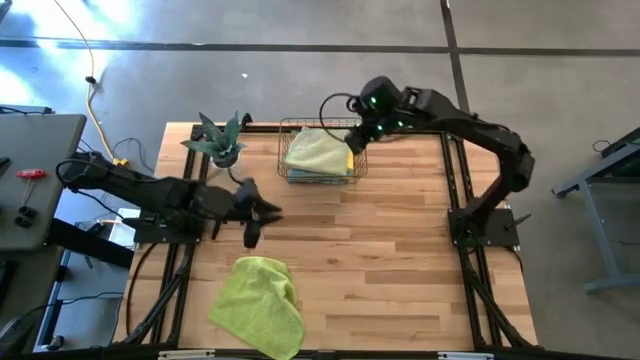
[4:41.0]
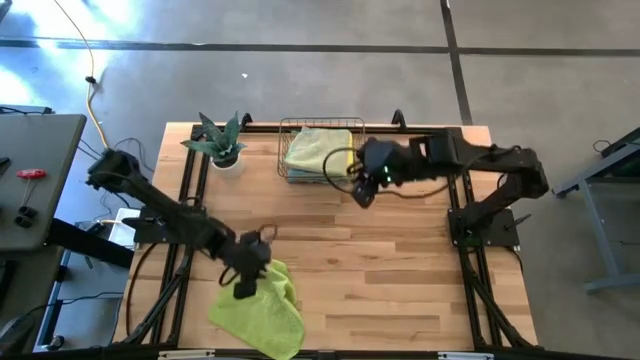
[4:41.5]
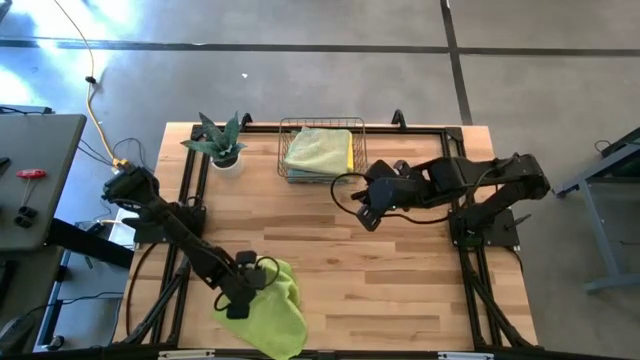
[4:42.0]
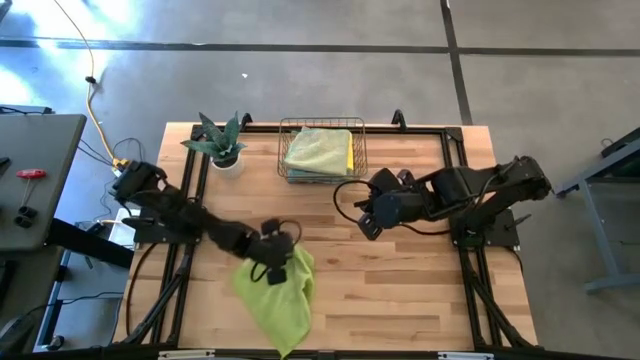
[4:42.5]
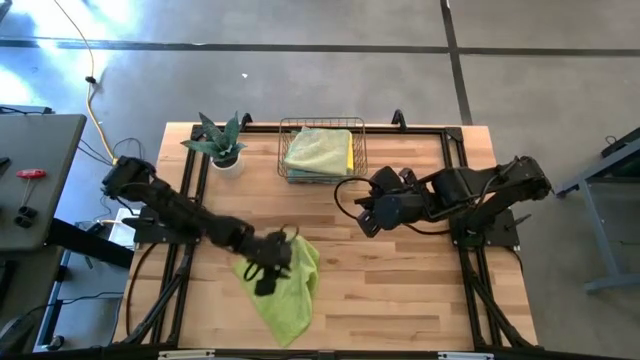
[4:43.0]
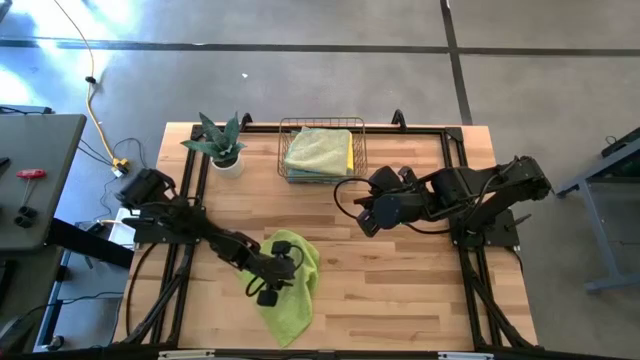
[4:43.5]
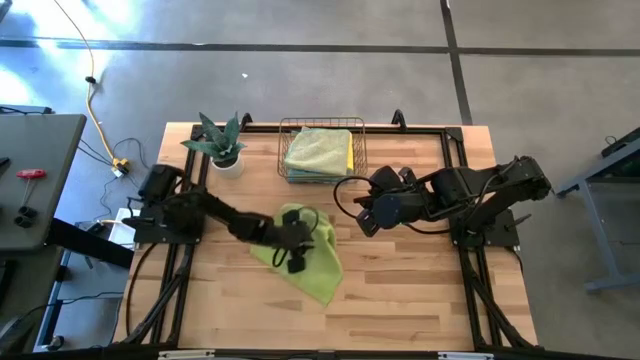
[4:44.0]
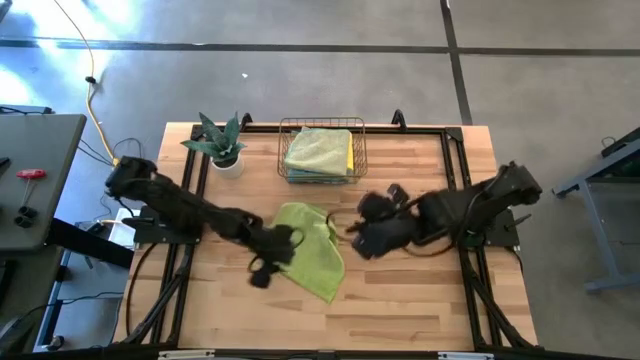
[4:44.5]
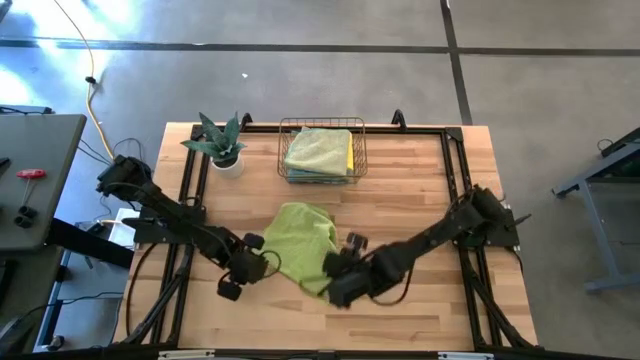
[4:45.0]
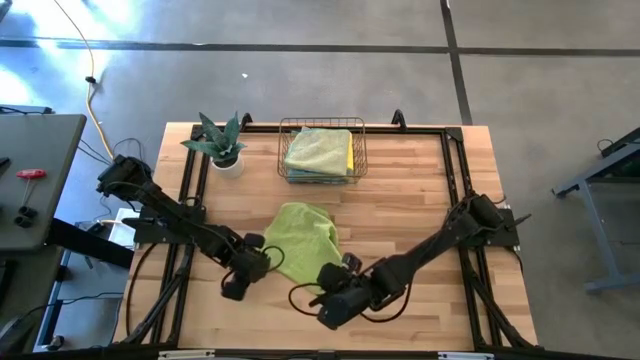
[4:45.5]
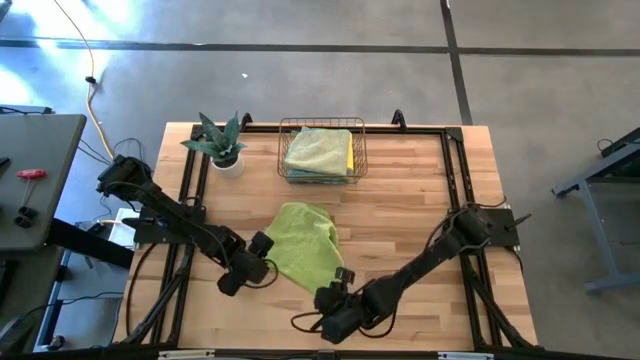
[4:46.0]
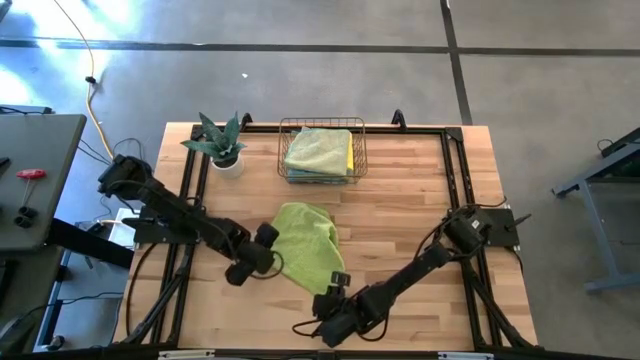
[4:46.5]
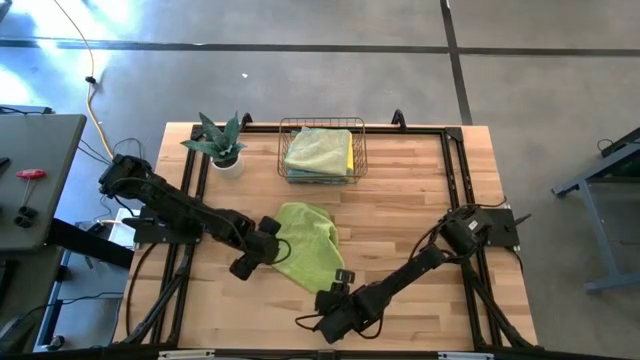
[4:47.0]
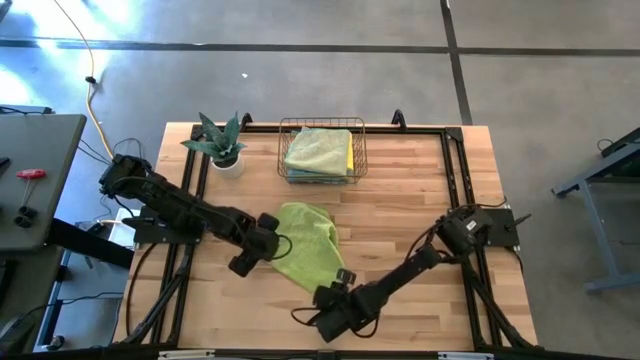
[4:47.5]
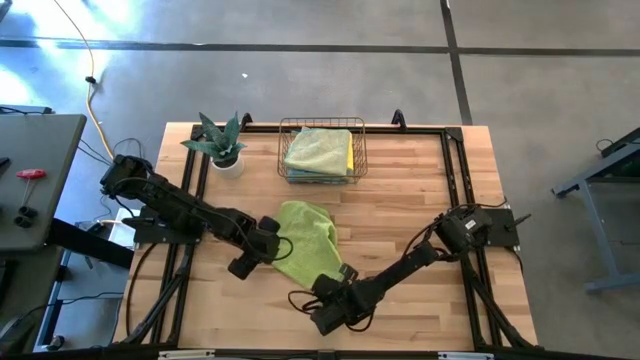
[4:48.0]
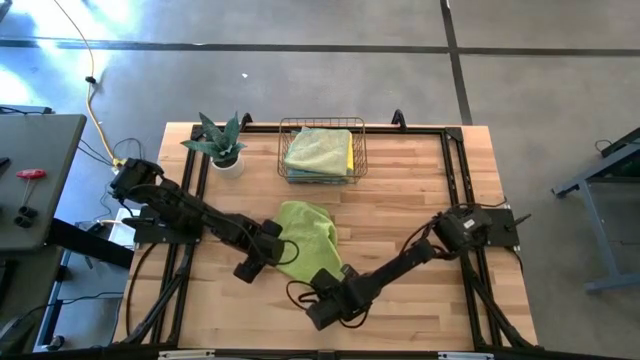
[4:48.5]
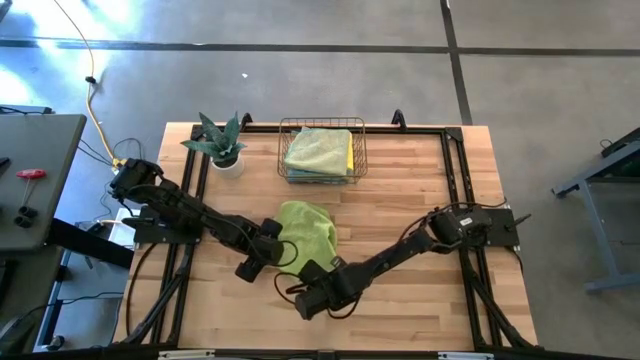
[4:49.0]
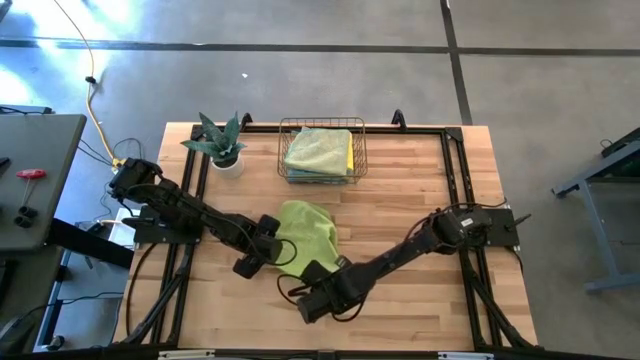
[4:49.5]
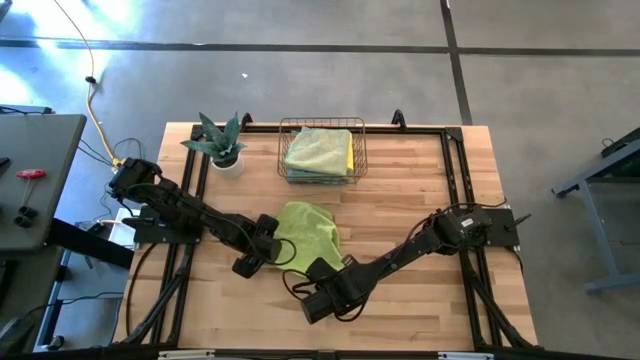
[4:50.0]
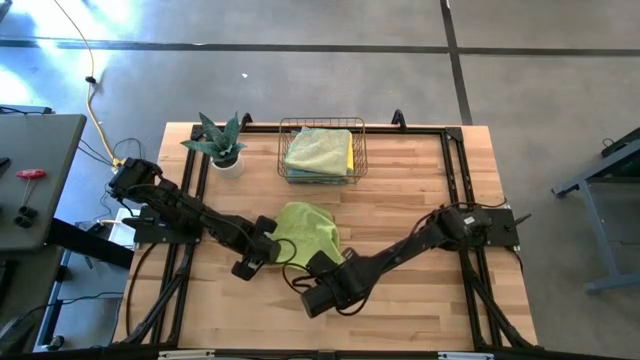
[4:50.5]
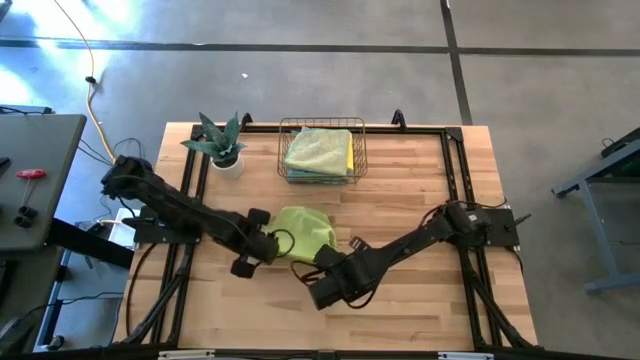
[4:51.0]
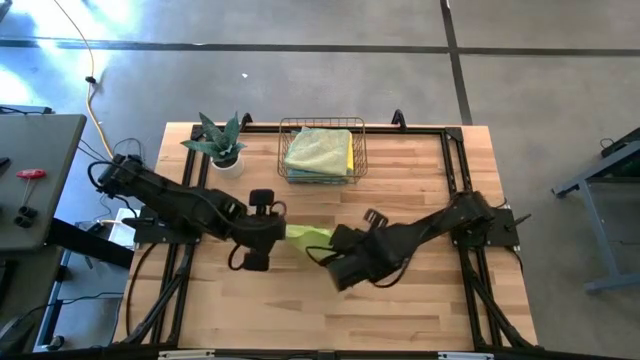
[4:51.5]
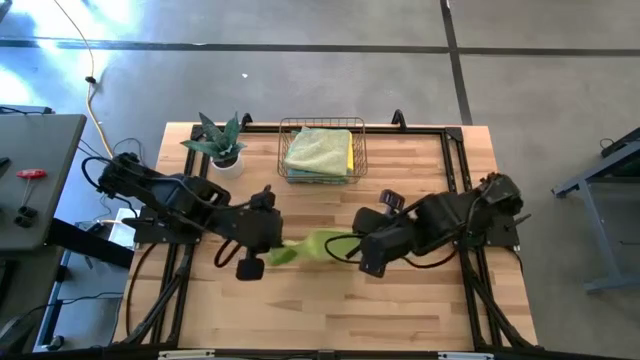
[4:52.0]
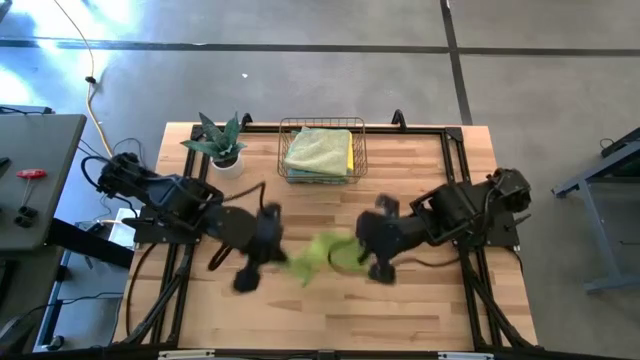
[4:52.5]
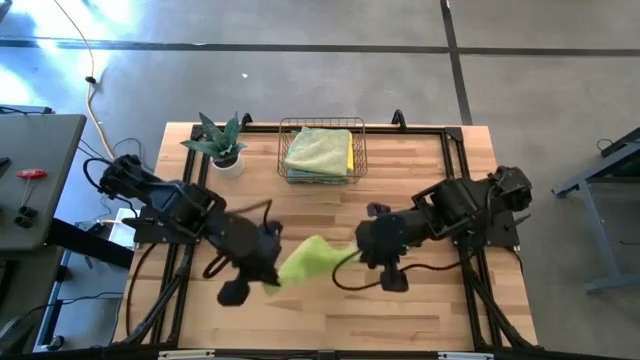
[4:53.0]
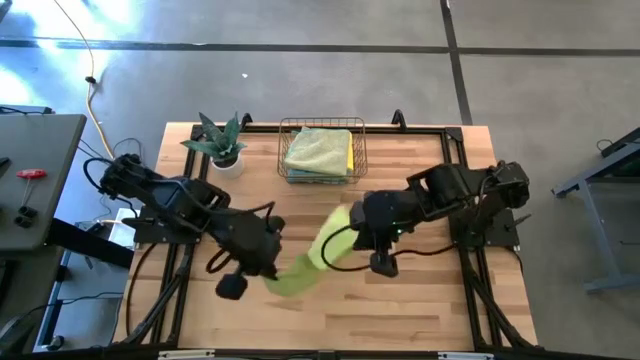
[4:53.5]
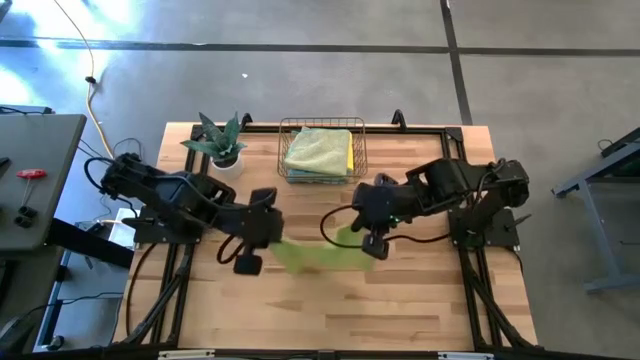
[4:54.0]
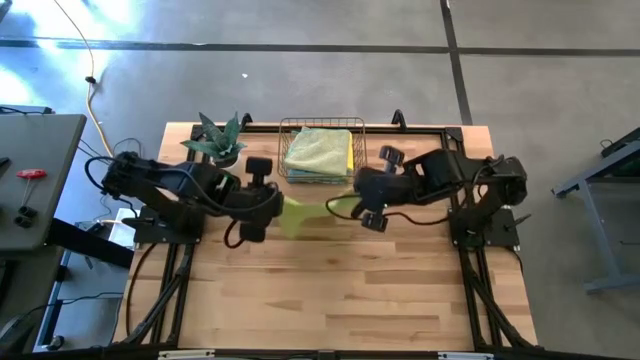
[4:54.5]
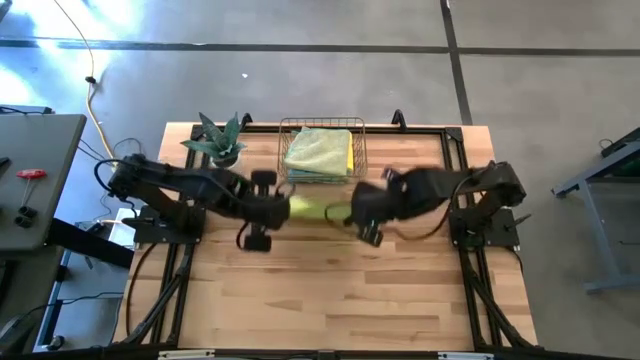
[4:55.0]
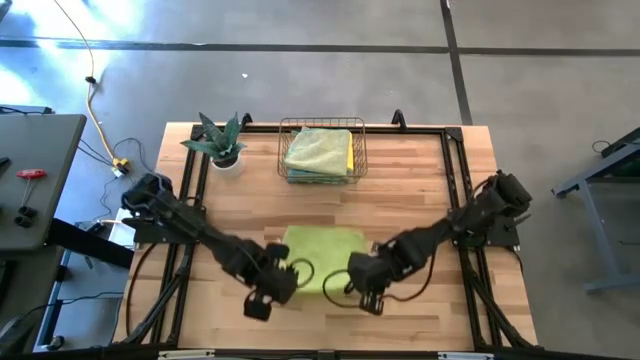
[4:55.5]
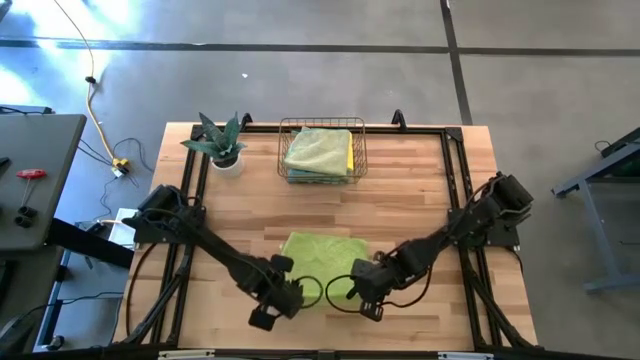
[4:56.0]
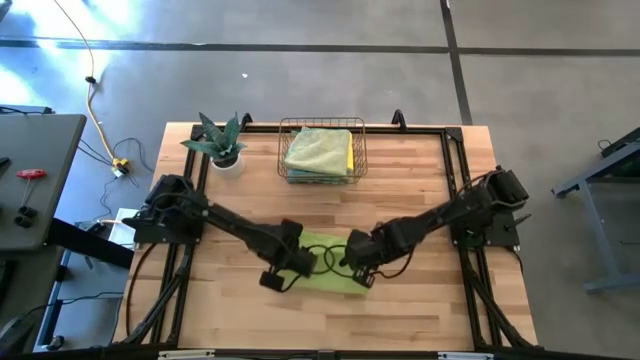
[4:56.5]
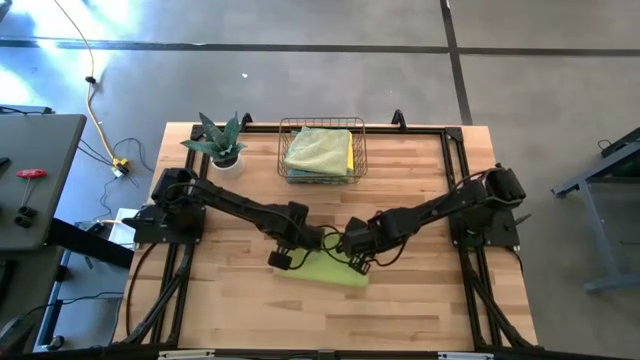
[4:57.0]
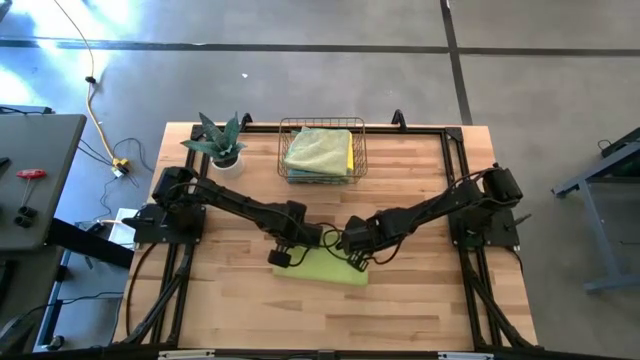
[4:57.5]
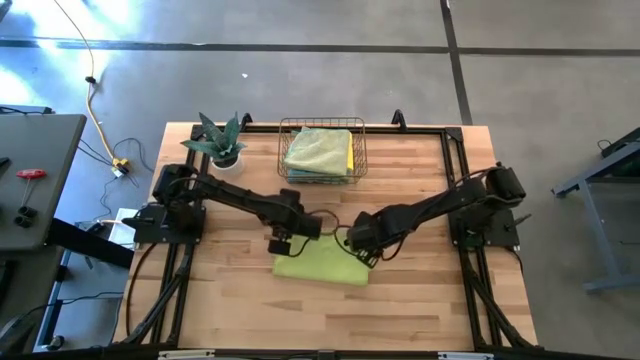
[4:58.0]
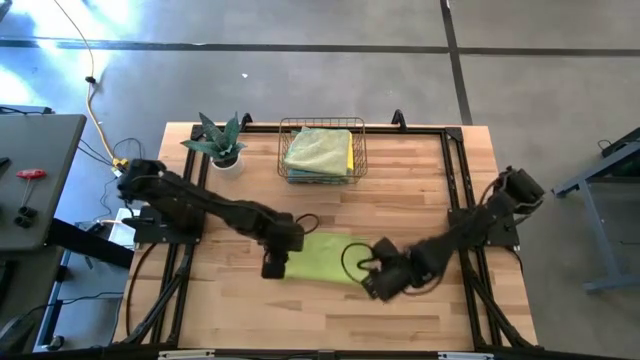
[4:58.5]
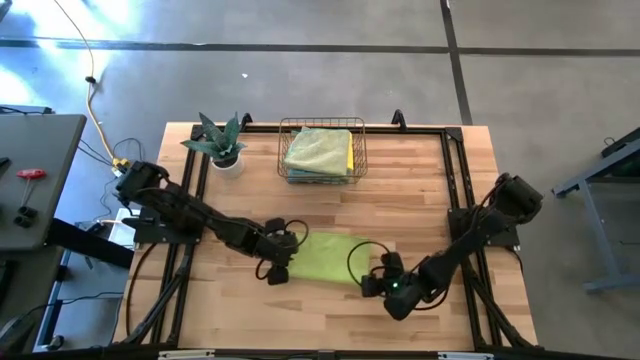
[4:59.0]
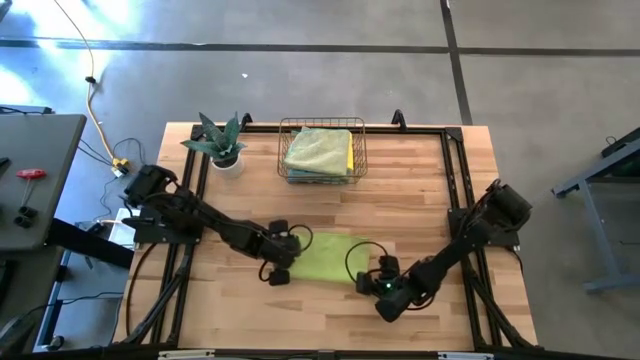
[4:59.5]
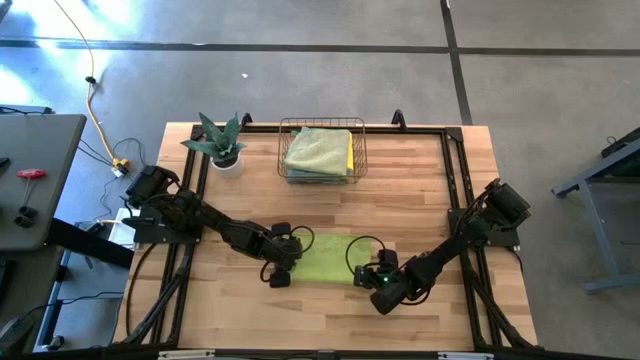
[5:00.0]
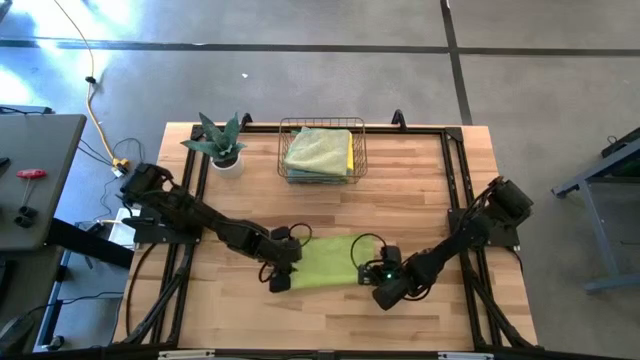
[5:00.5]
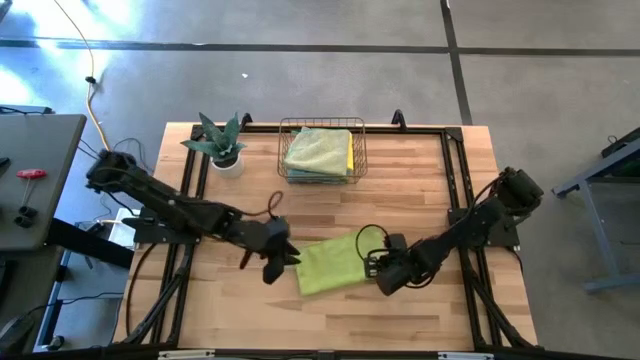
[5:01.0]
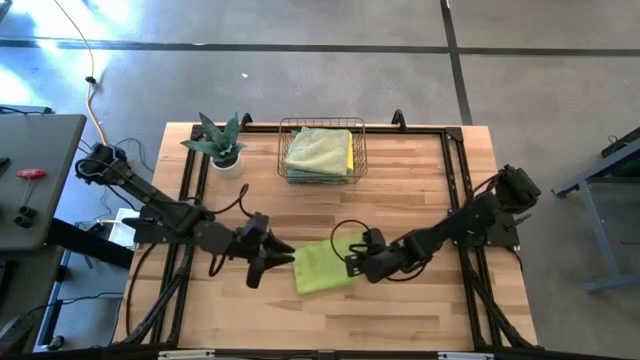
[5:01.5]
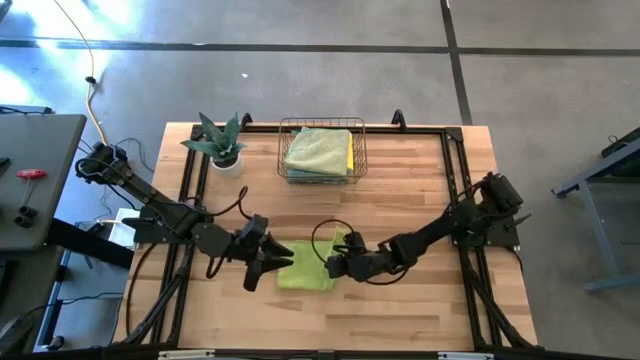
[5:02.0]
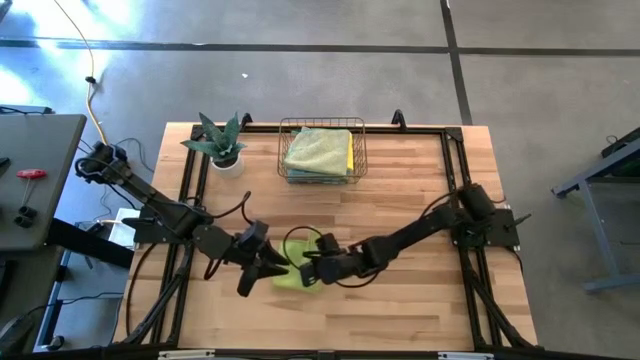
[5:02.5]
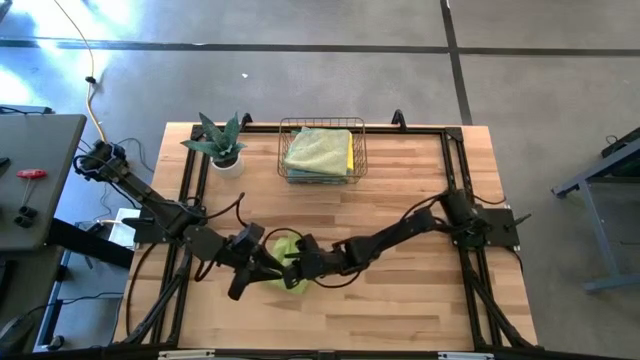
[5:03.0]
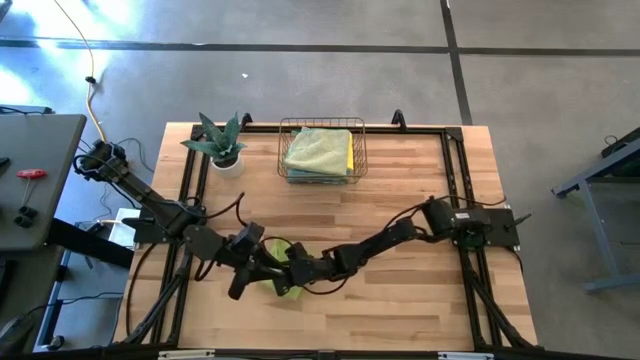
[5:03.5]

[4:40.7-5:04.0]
Task: Fold microfiber towels
Fold the green microfiber cloth
